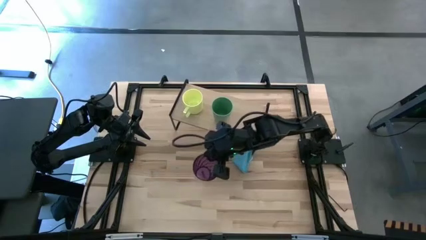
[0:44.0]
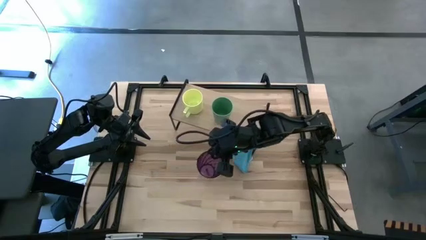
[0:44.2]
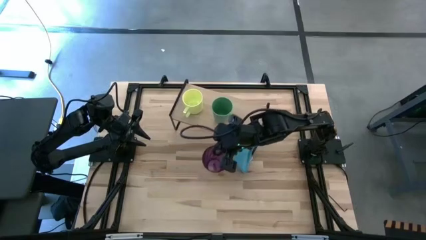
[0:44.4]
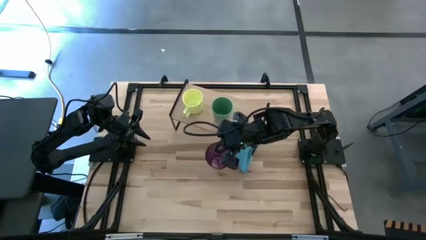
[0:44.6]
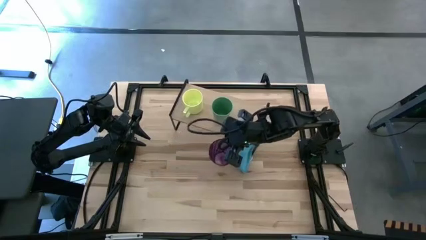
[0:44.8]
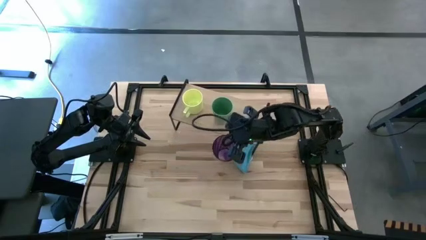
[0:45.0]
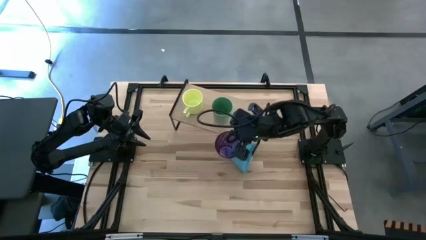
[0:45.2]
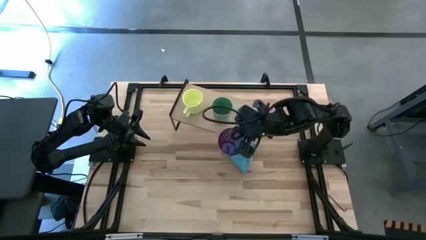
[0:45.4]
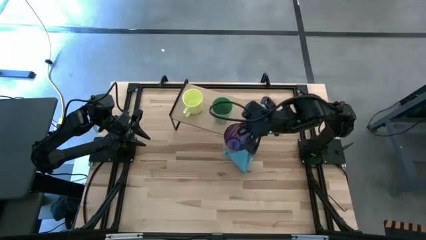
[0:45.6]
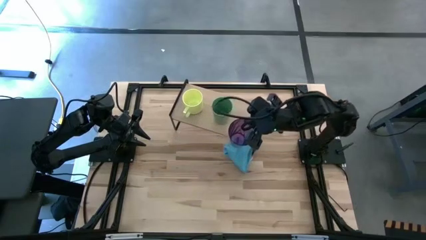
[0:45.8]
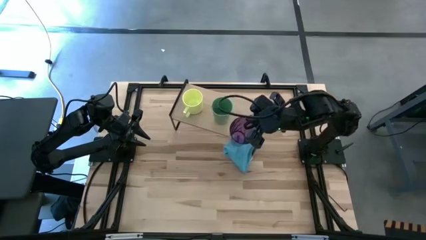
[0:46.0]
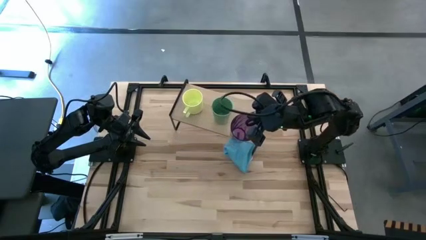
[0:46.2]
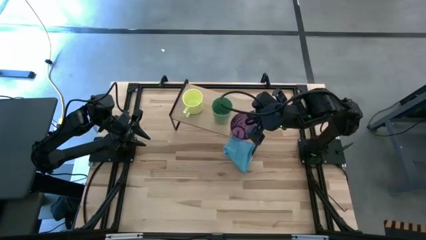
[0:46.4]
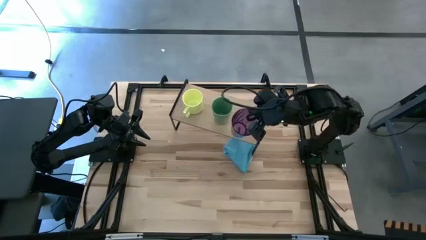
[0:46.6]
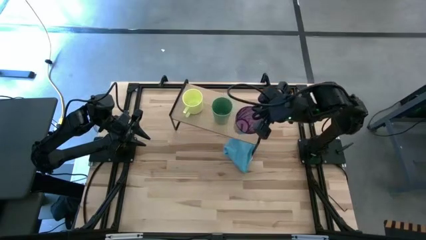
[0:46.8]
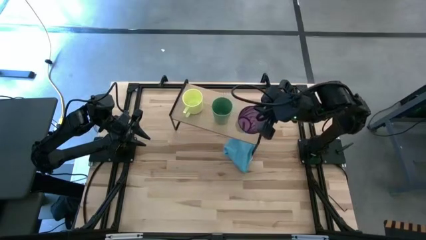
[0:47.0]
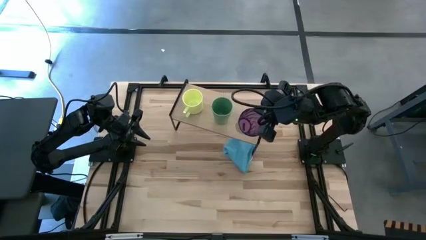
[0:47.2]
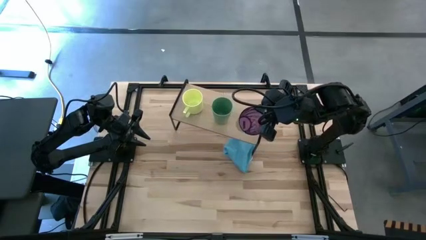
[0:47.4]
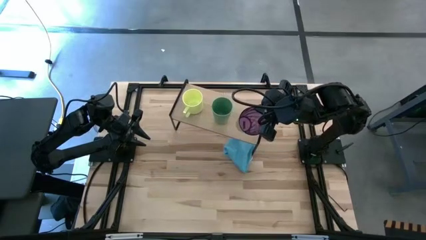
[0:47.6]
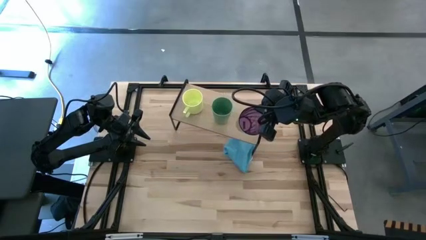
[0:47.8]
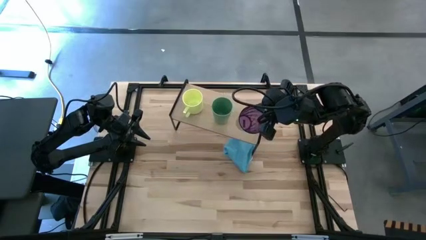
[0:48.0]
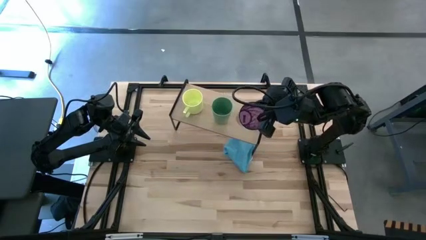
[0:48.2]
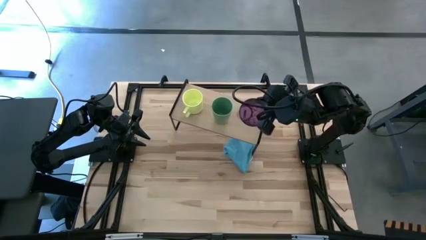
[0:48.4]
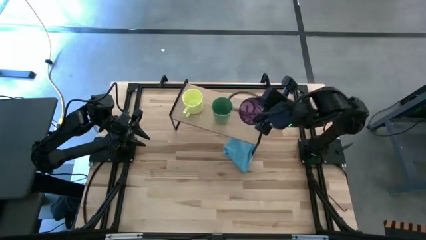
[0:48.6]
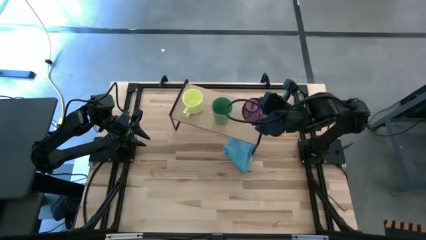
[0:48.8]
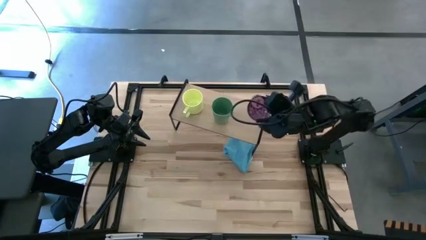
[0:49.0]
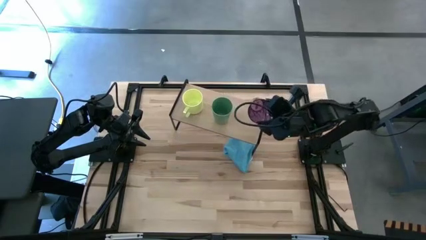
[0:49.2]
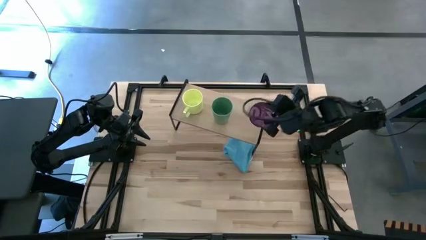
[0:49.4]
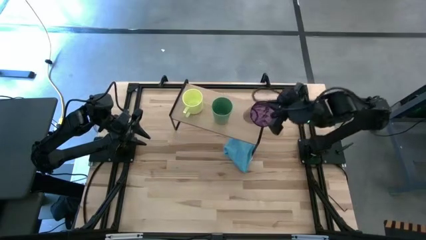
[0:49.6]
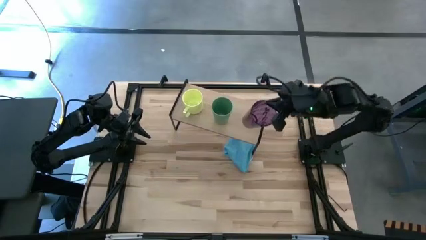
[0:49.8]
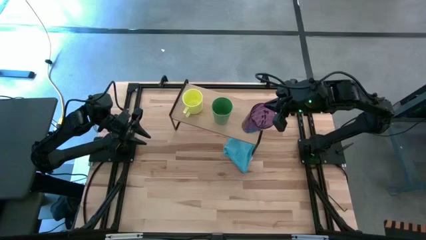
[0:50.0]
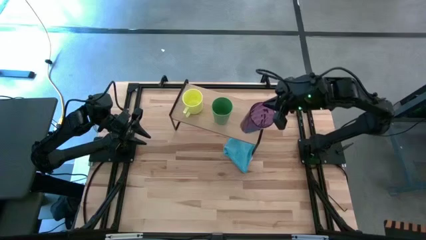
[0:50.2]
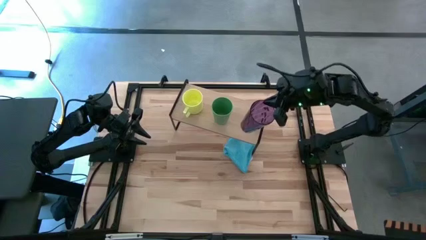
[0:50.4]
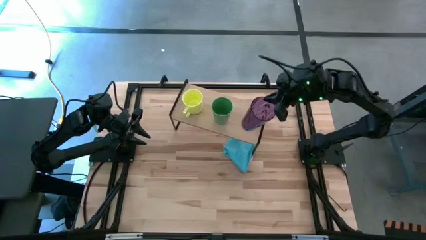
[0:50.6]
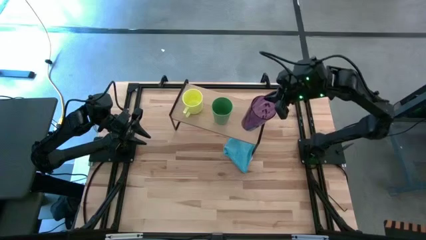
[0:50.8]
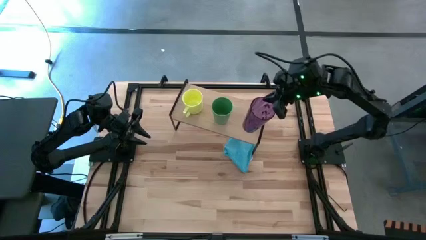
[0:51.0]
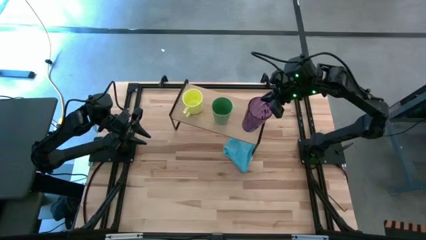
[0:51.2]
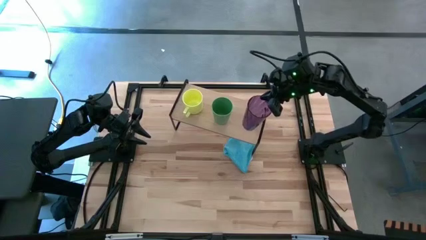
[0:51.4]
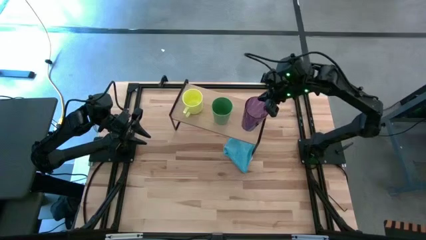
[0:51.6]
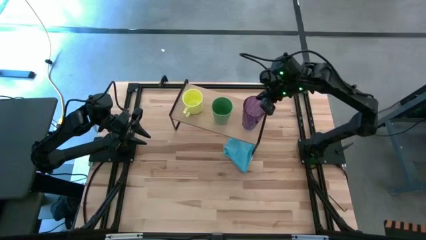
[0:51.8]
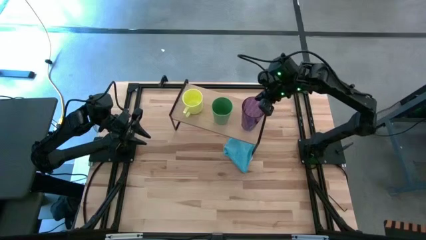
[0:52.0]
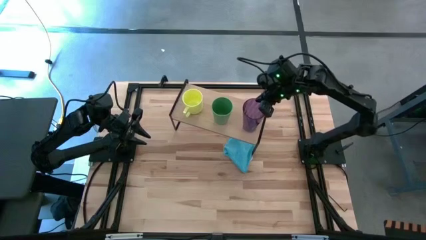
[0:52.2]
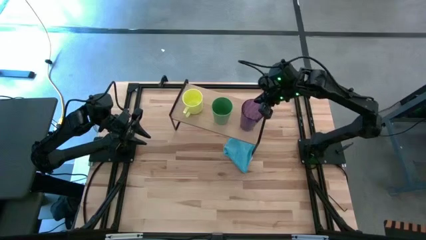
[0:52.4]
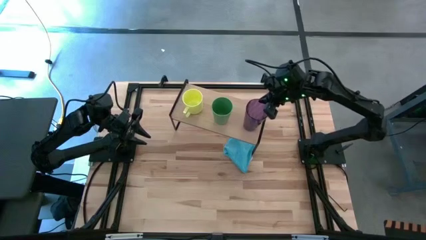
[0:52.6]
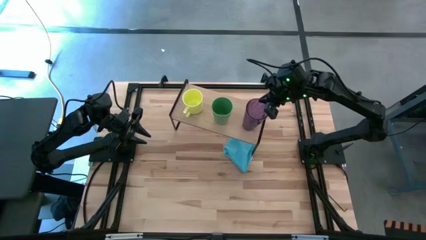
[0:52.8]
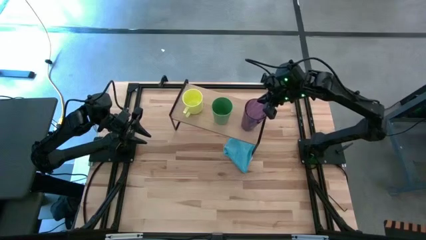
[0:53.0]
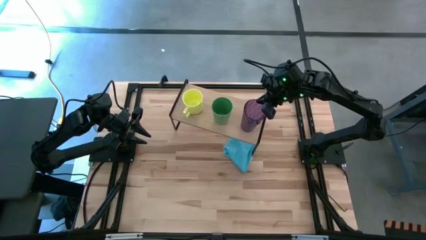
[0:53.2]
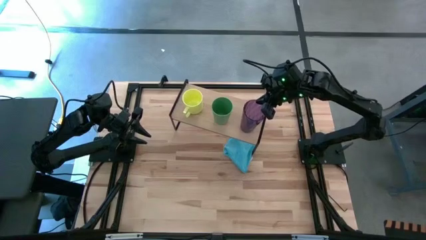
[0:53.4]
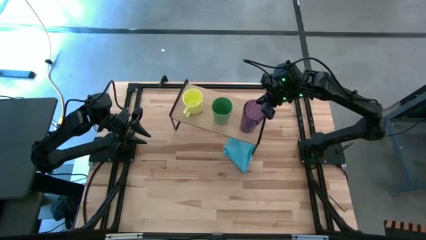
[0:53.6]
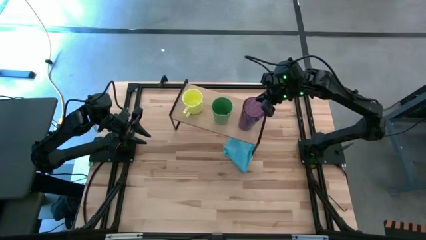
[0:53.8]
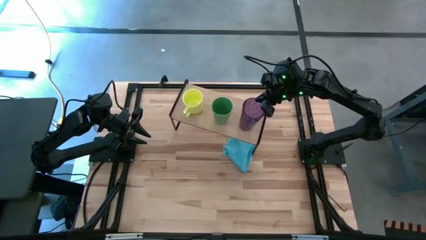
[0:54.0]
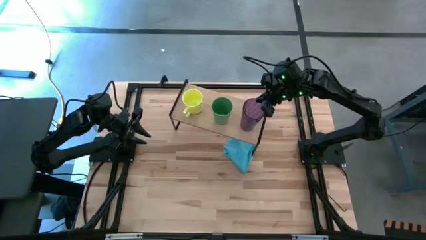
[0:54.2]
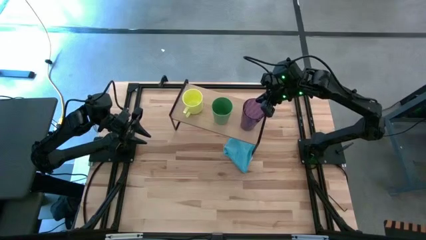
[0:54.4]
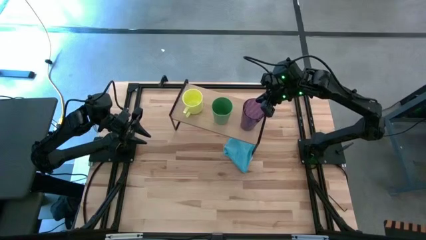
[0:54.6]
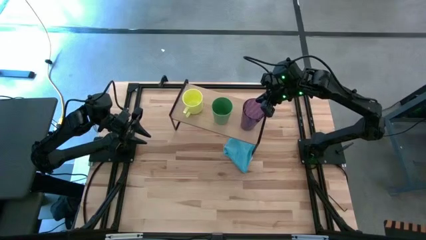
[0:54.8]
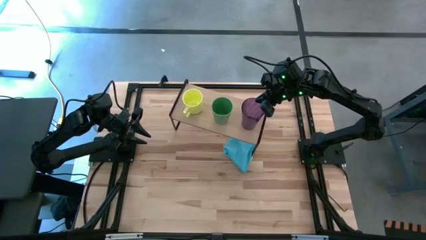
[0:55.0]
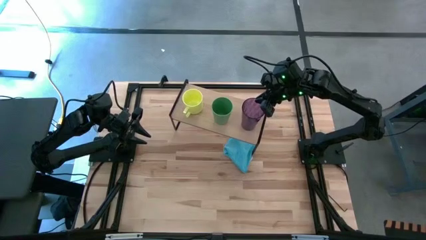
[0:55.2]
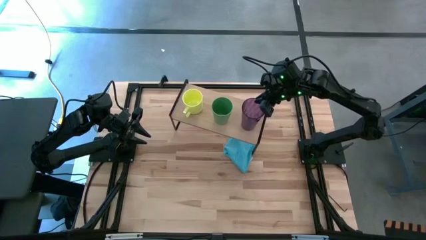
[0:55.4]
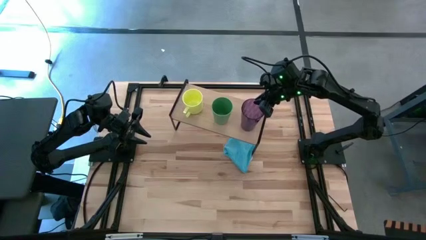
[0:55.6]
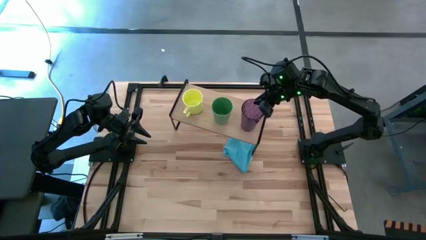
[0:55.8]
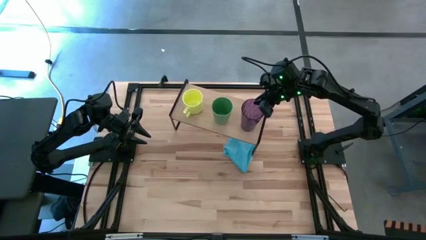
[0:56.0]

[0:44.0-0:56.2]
Task: Stack small to large cups/mugs on shelf
Put the violet cup on the shelf

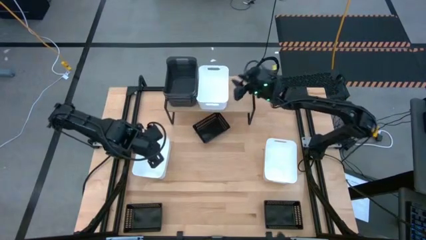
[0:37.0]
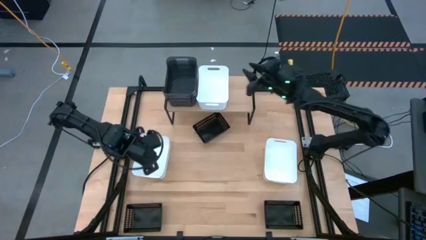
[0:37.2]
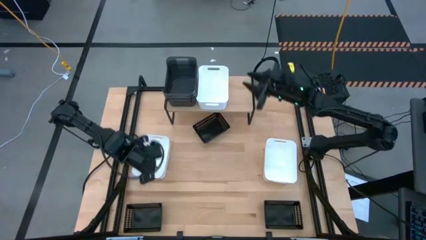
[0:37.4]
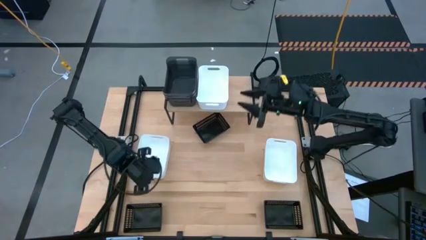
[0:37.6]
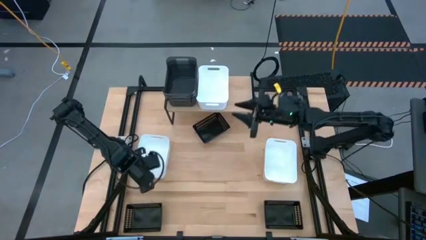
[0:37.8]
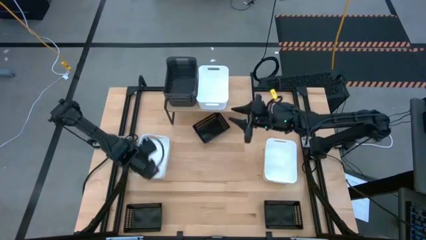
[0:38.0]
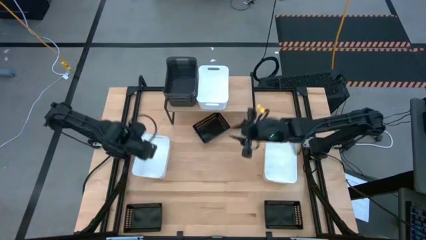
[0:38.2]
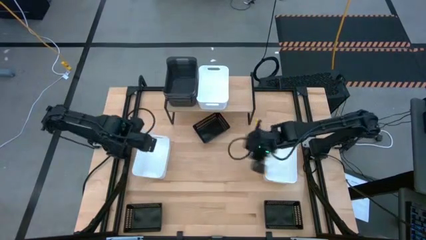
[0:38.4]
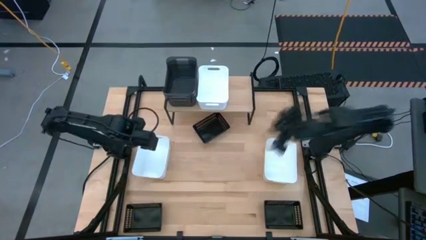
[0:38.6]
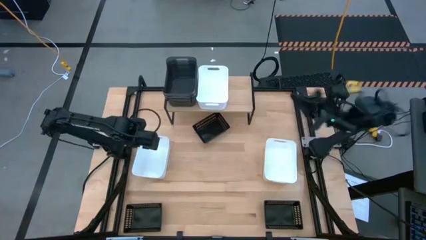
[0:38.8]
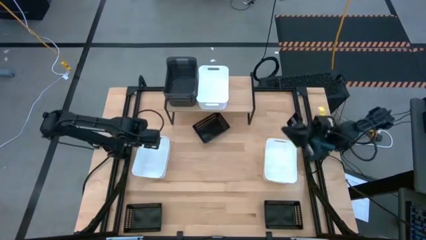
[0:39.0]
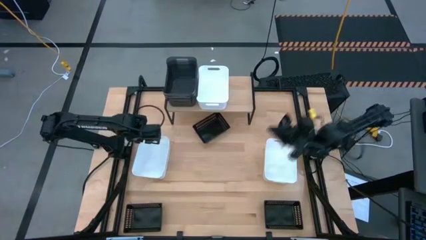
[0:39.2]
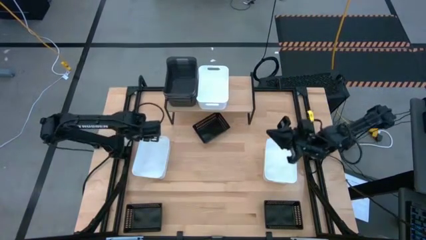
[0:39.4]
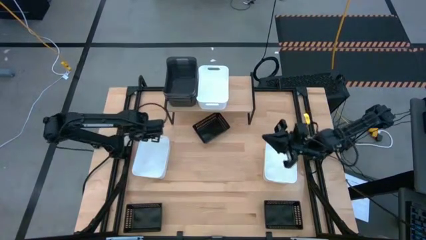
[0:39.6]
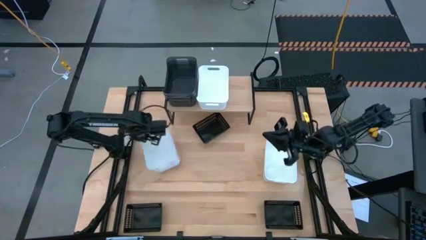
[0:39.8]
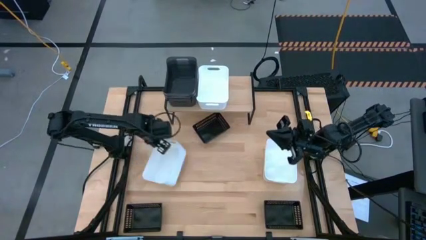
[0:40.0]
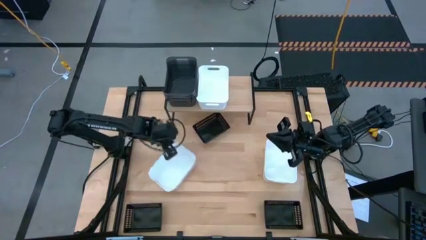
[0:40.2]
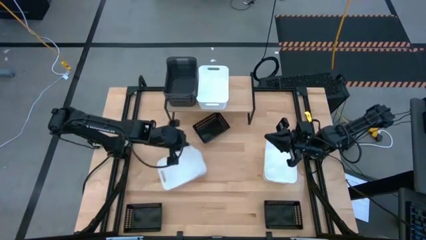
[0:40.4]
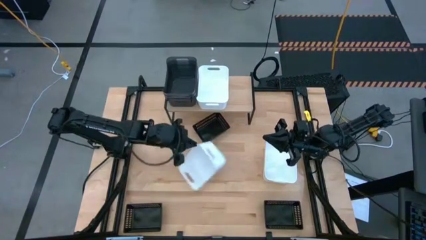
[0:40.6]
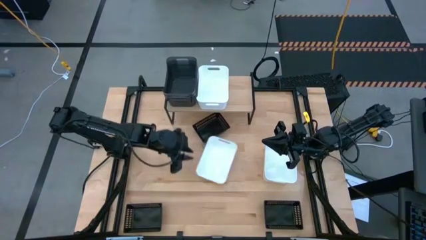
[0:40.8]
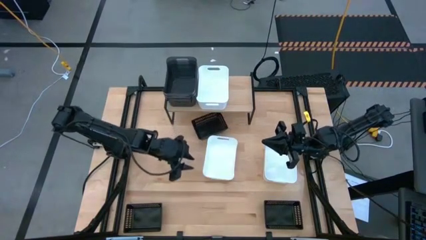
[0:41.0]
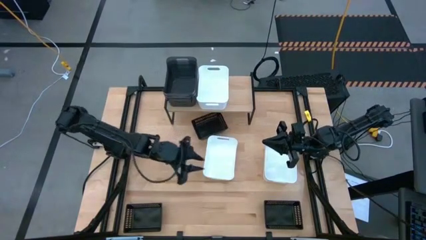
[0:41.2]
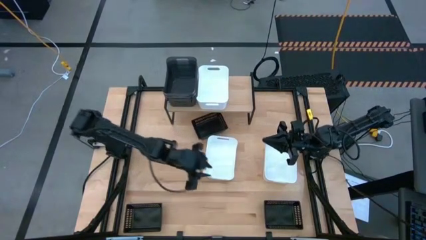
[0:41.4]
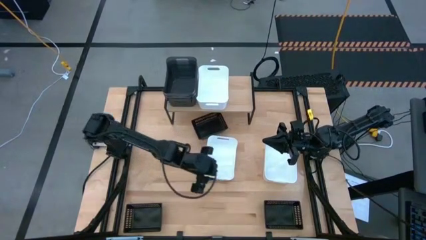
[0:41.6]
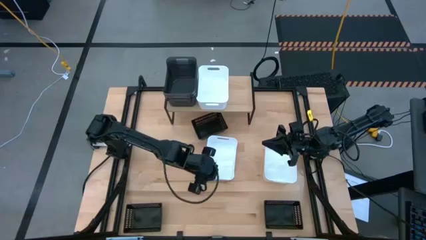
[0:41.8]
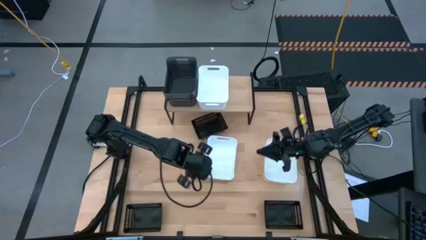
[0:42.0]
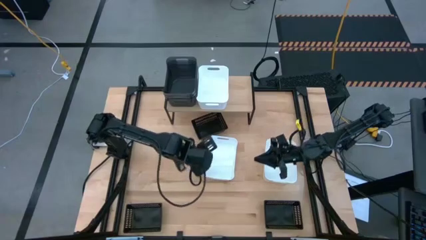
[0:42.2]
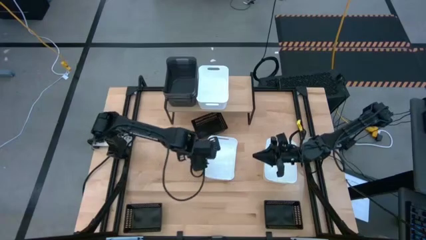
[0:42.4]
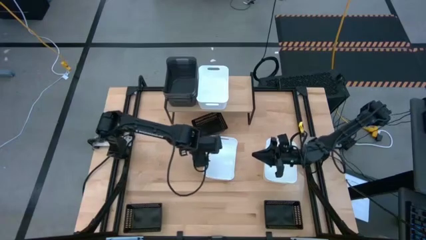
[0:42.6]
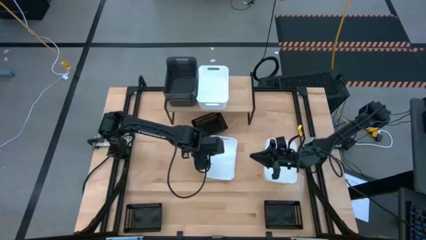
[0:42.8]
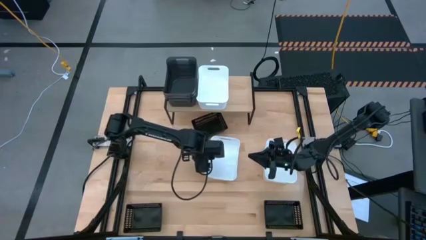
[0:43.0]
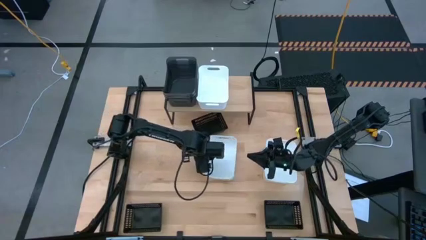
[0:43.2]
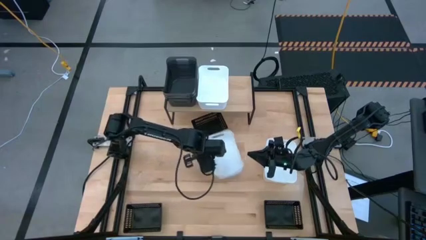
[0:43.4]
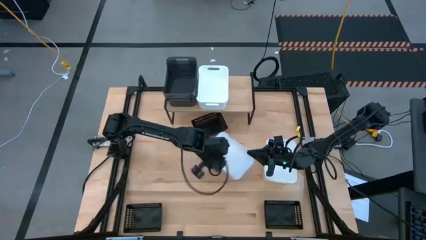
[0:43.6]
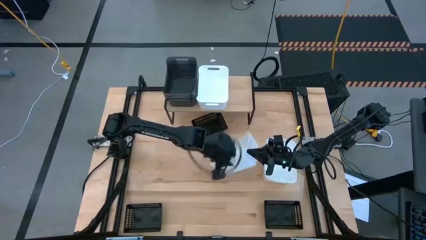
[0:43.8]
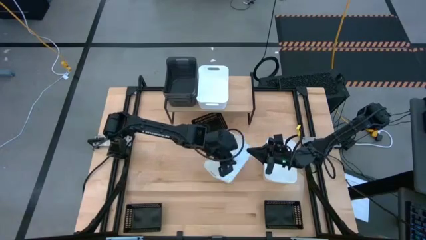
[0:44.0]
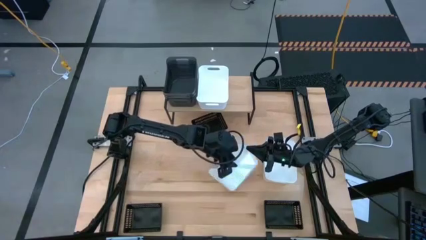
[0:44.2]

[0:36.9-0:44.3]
Task: Stack baskets on shelf by color
Stack the left white bin on top of the white bin on the shelf
